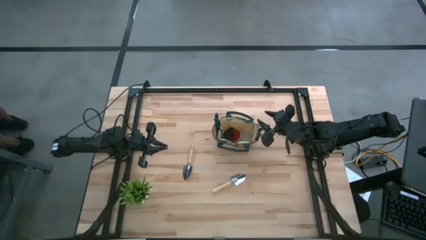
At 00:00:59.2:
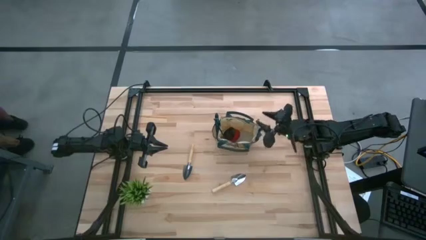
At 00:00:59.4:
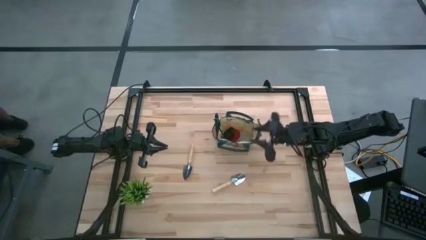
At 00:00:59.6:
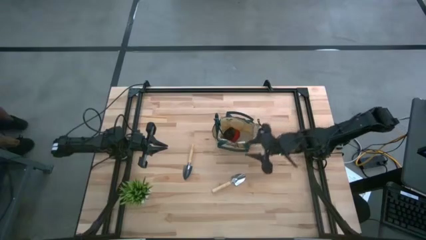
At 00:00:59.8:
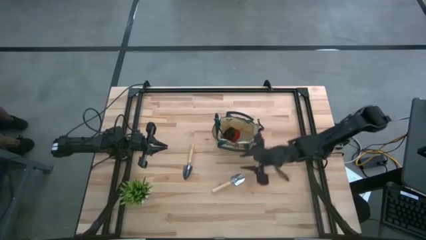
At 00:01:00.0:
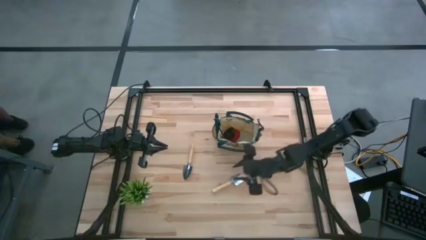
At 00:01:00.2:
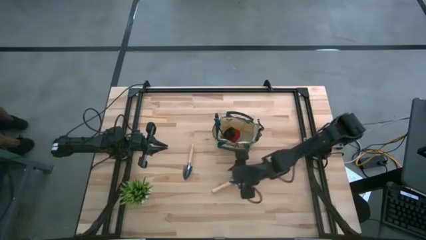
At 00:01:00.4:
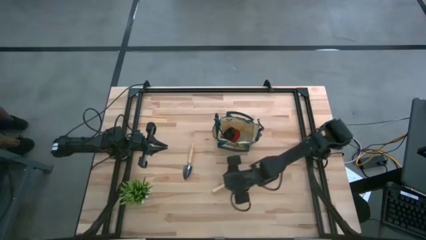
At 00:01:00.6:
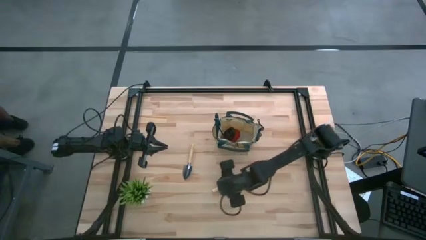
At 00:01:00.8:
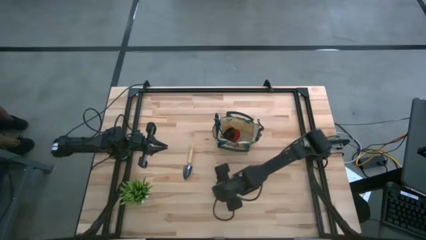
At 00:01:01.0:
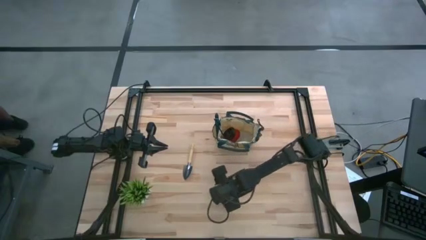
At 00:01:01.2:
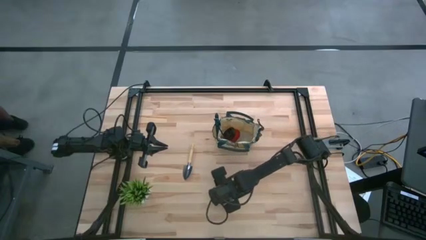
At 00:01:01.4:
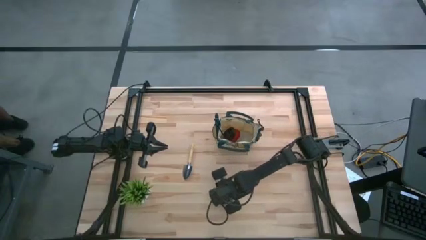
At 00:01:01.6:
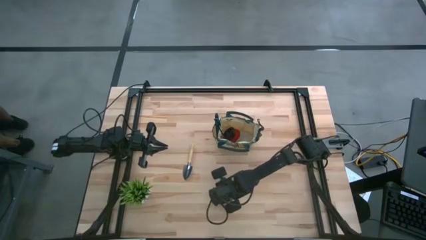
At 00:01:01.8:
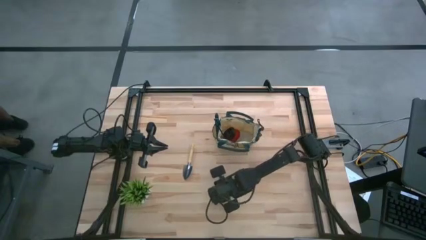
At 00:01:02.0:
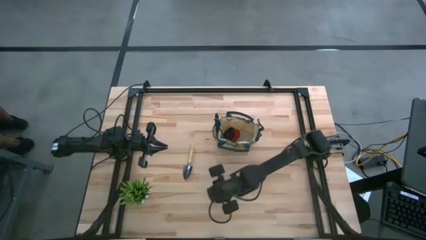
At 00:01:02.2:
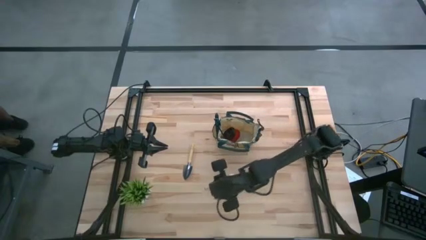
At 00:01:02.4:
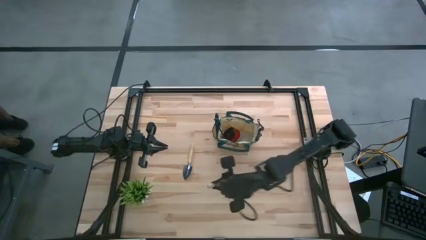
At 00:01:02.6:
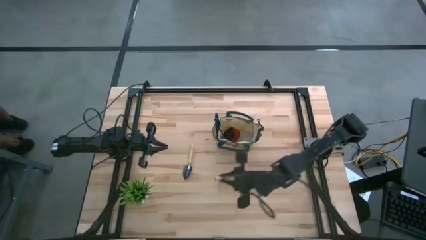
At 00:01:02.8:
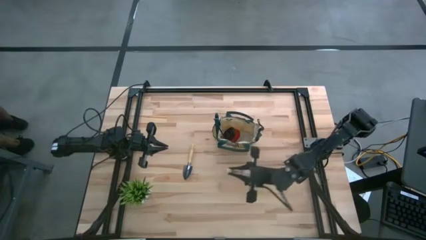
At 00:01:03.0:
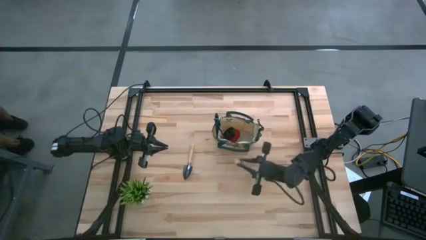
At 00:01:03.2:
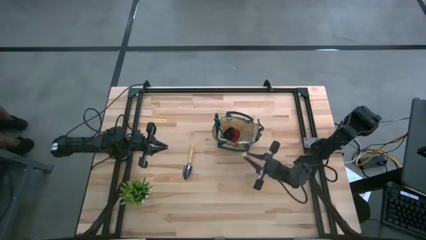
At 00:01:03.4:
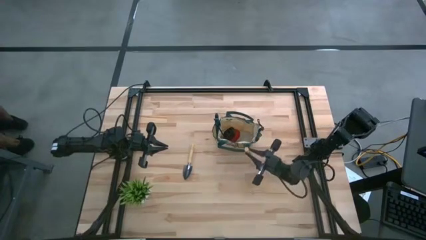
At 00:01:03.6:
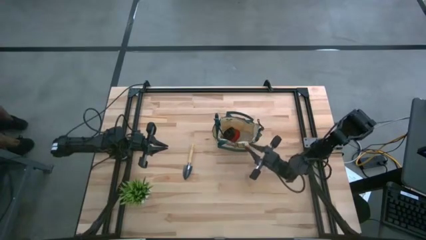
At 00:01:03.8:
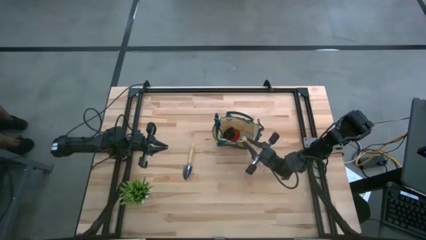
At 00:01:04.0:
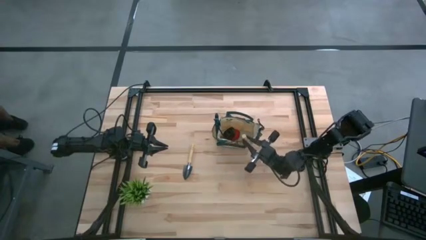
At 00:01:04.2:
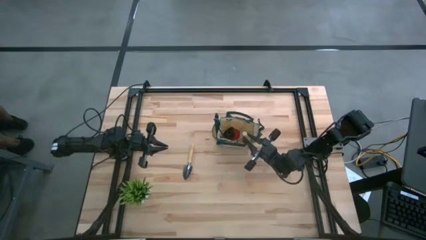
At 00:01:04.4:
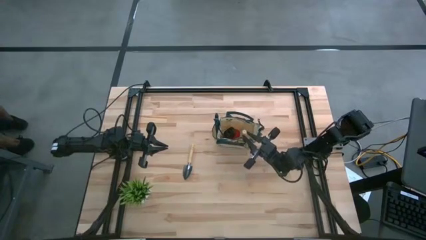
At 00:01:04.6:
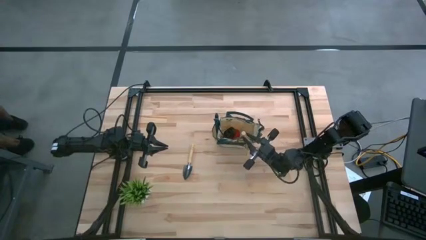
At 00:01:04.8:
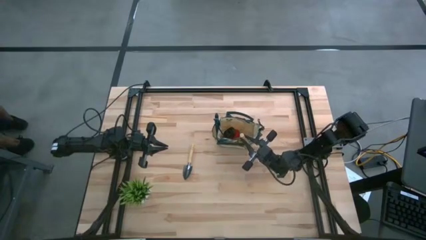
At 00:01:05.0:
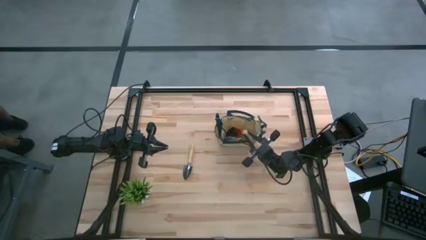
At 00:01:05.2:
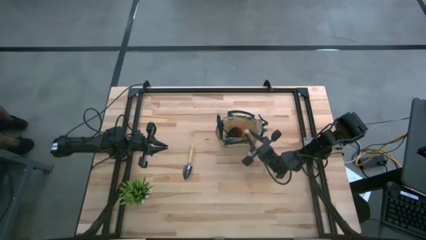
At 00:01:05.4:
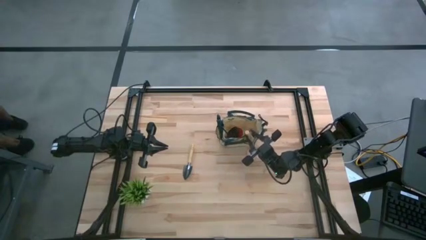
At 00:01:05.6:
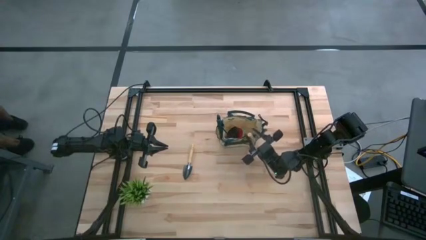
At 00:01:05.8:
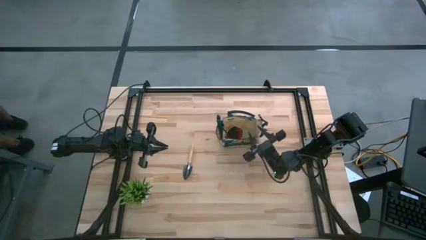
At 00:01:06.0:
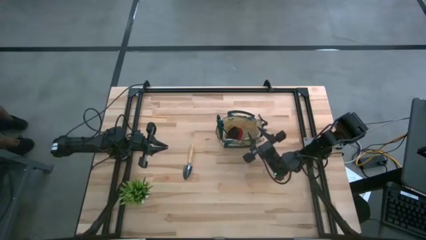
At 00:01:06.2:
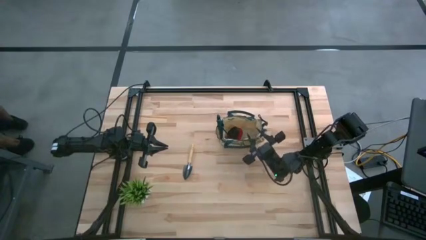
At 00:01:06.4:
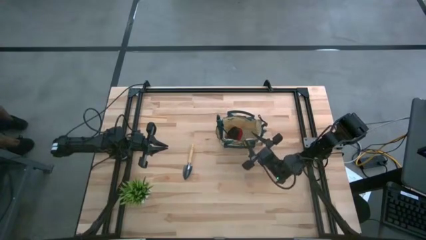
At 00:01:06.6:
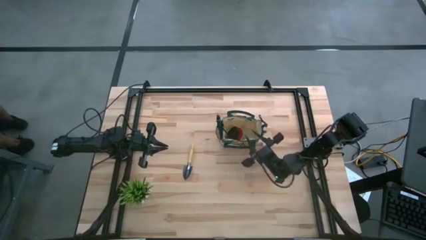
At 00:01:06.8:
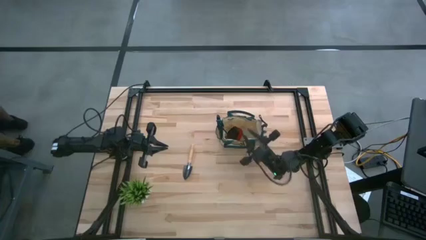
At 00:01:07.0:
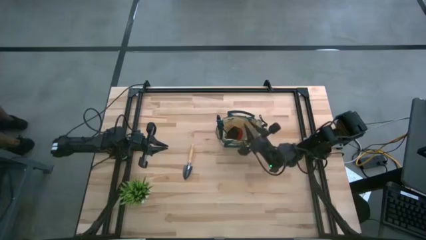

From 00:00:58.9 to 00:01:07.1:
Task: Pick & Place Garden tools in Gardening bag
Put the right trowel into the gardening bag

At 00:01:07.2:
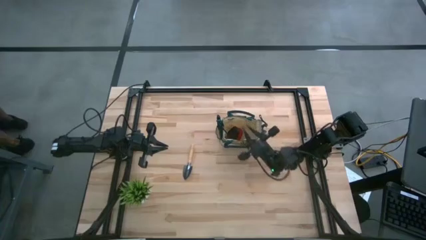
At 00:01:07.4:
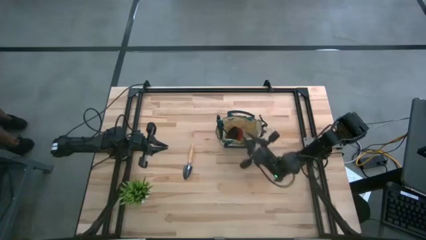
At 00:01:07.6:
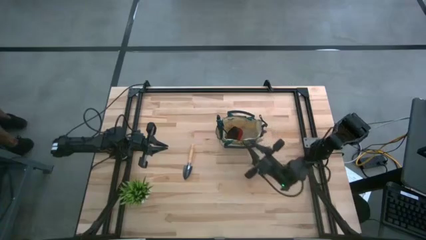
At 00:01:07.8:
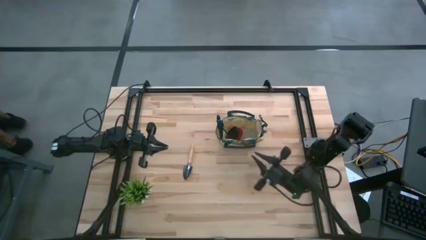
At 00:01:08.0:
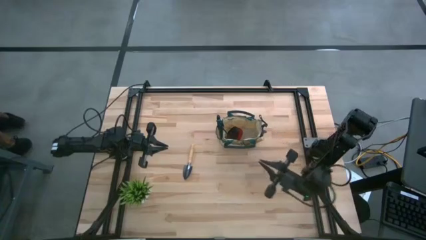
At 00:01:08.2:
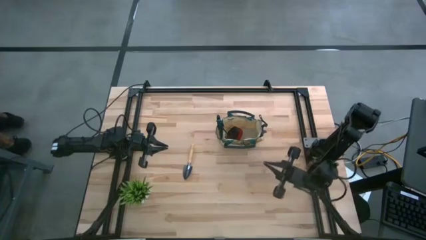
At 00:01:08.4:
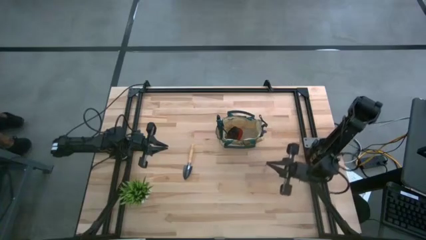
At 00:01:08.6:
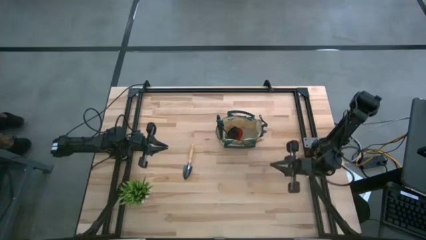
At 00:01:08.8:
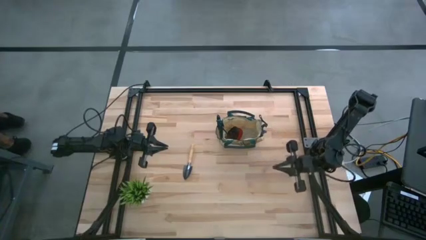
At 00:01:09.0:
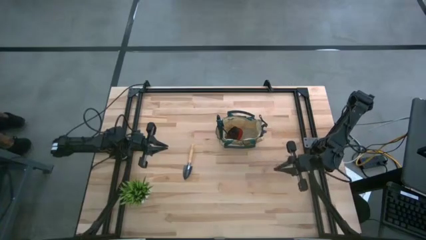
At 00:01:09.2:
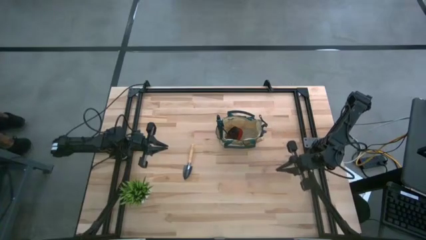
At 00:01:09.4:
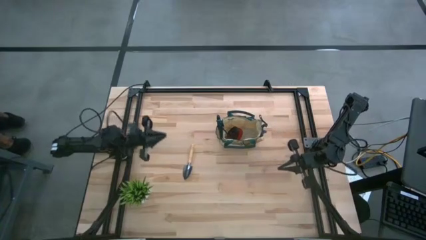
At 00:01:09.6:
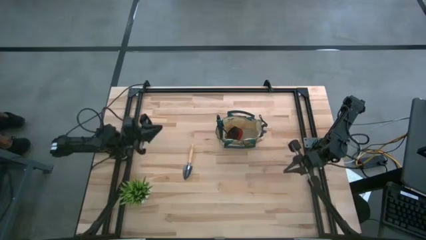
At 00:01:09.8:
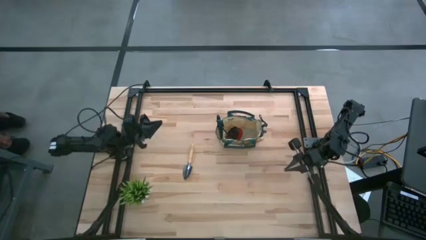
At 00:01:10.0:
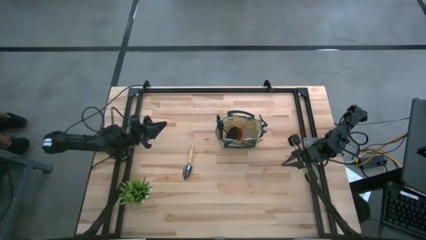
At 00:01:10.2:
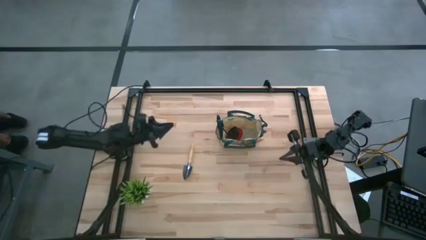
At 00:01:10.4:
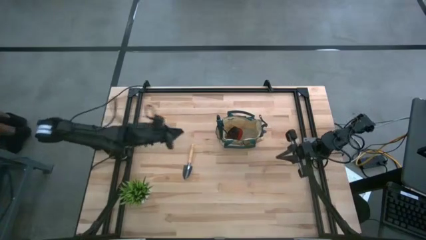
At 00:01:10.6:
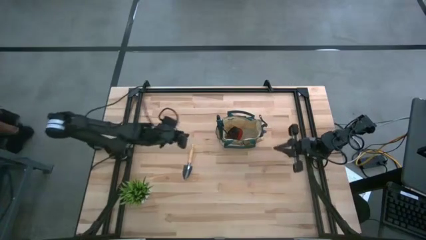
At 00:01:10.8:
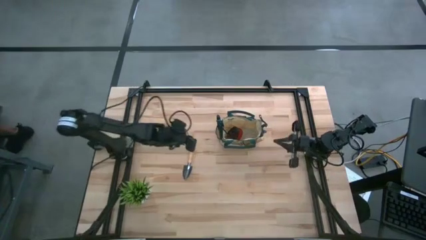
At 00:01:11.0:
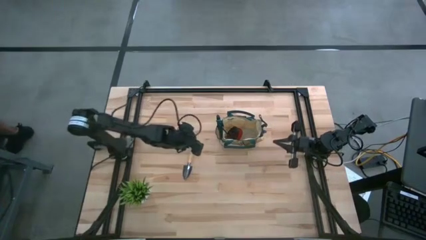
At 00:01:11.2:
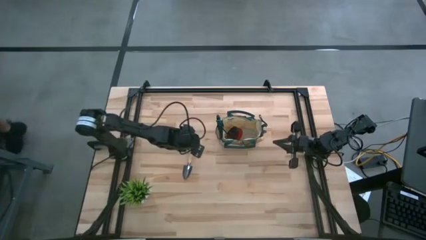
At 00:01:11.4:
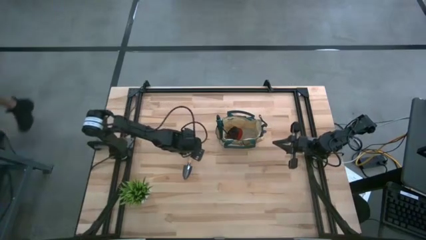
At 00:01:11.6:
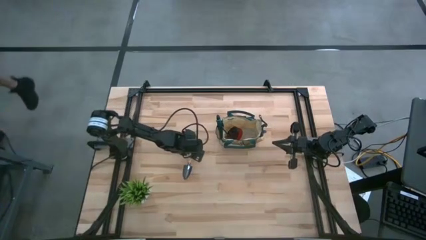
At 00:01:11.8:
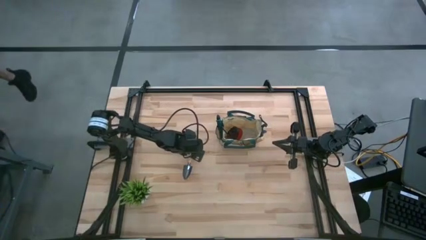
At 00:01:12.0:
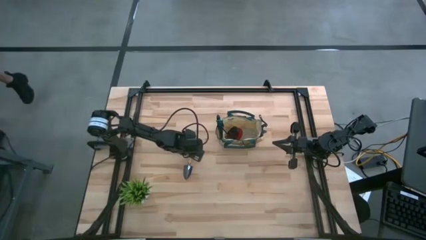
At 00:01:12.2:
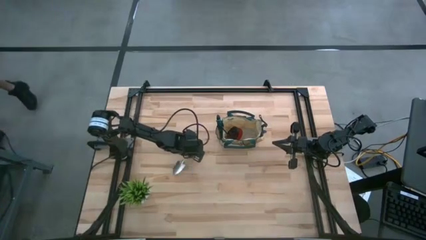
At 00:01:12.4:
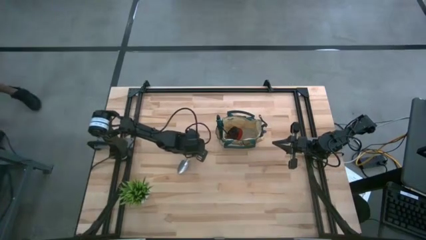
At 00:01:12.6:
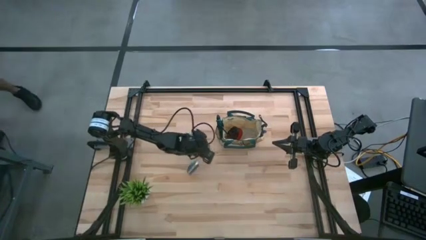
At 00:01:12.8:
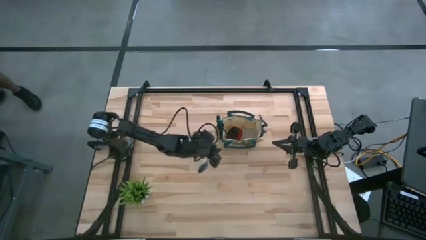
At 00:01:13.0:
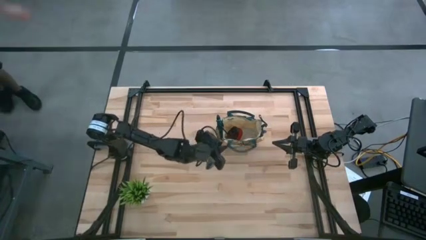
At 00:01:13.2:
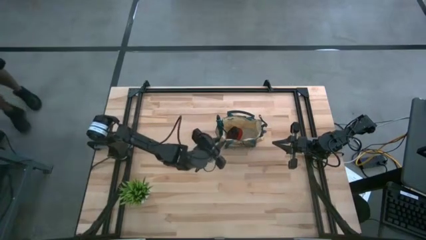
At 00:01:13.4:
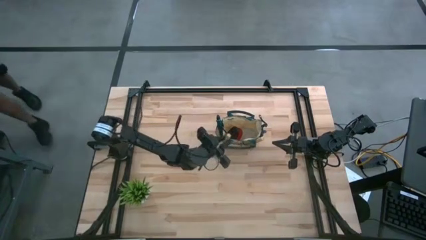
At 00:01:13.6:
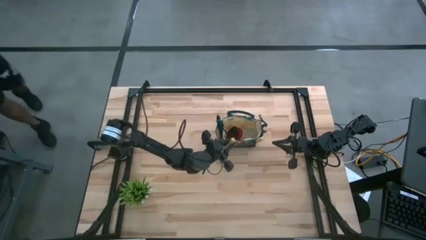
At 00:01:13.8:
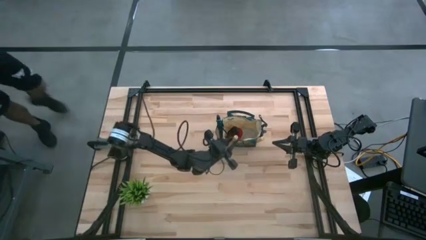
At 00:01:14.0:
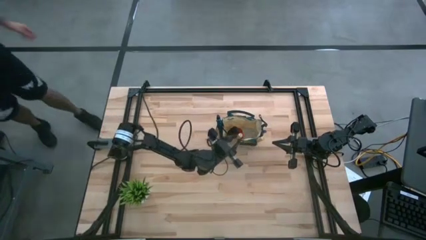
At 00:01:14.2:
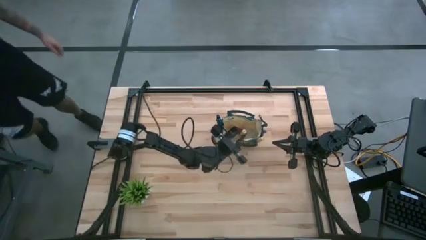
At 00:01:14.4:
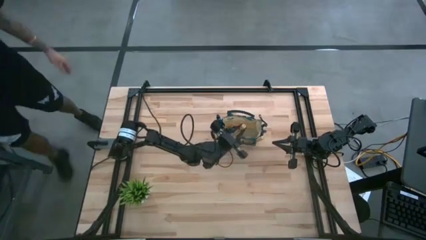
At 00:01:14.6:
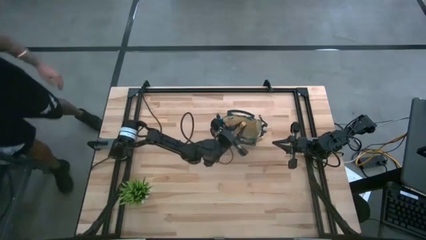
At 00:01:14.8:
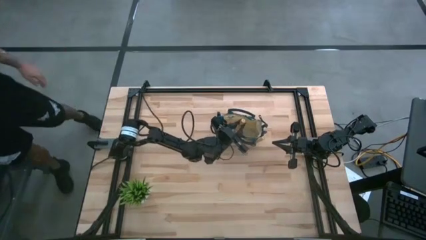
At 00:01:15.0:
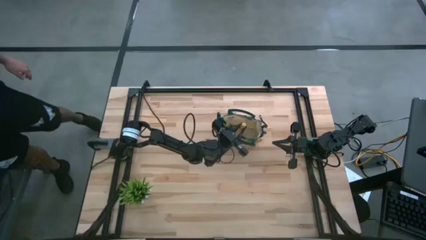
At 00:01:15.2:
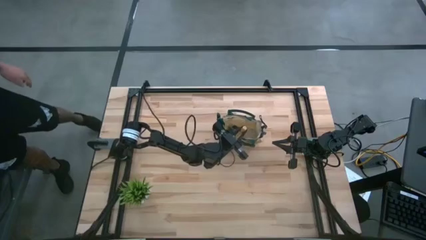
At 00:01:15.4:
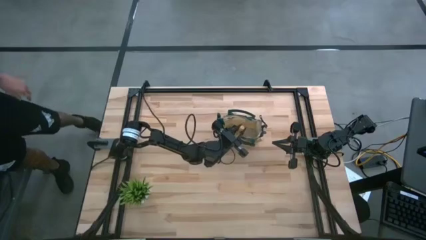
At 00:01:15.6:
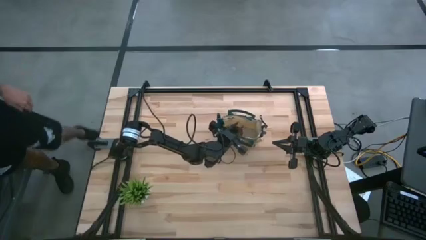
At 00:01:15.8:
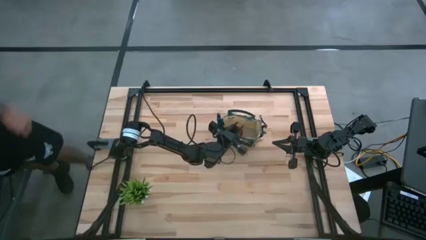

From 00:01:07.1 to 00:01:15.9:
Put the left trowel into the gardening bag
